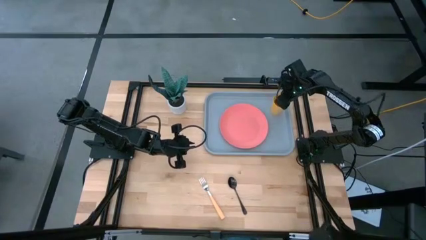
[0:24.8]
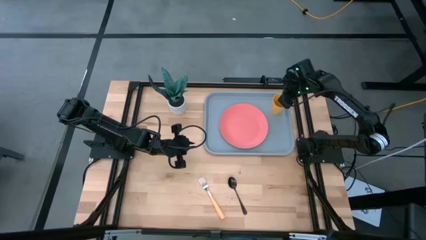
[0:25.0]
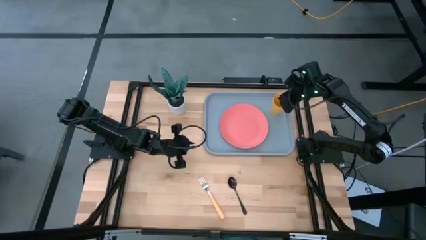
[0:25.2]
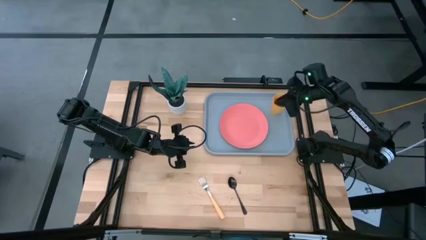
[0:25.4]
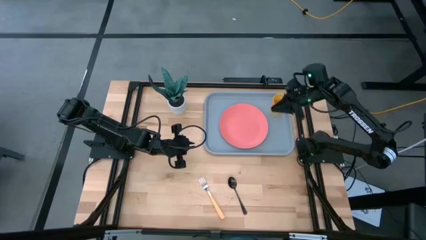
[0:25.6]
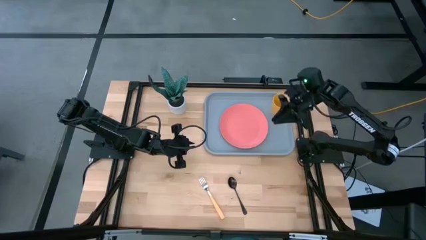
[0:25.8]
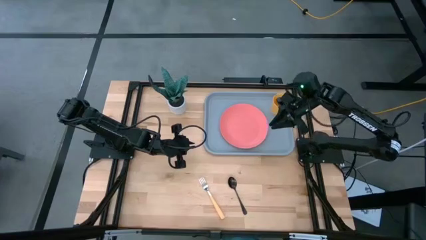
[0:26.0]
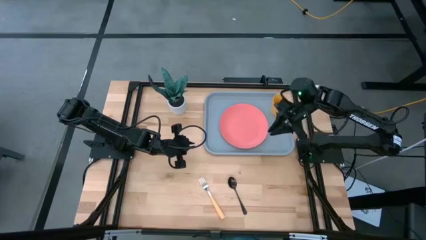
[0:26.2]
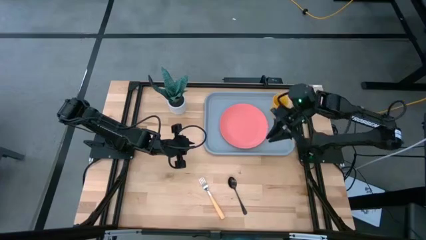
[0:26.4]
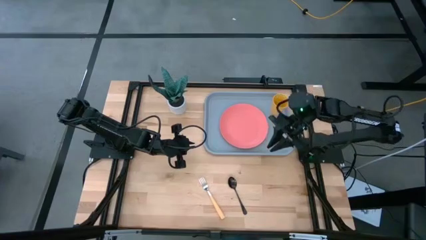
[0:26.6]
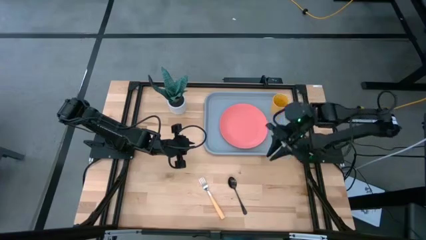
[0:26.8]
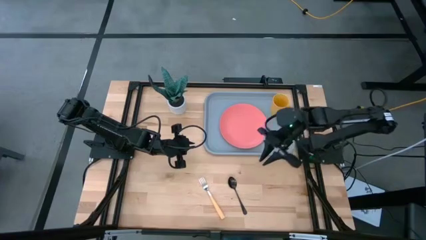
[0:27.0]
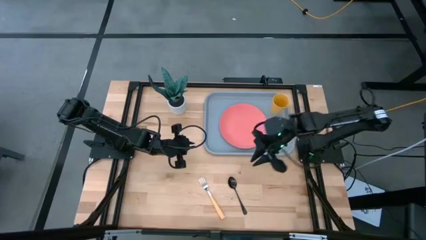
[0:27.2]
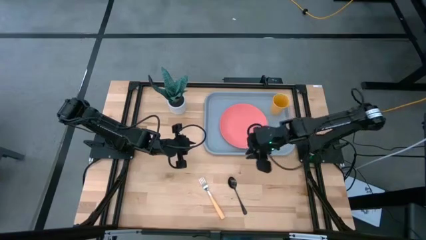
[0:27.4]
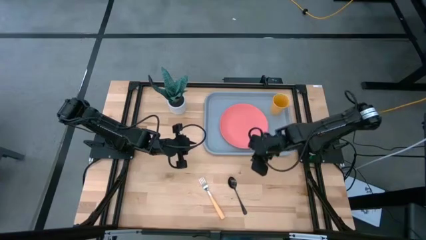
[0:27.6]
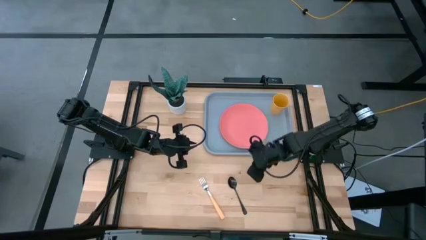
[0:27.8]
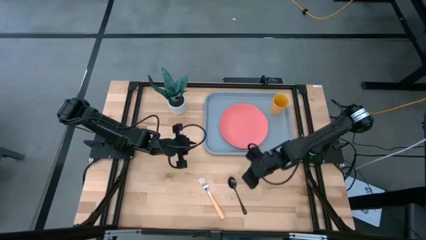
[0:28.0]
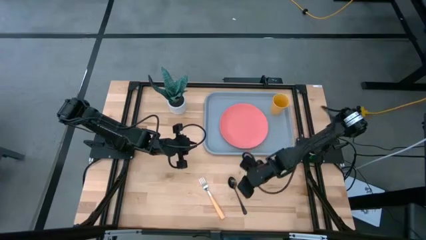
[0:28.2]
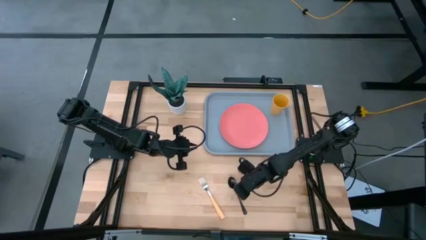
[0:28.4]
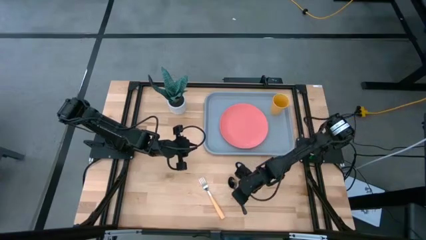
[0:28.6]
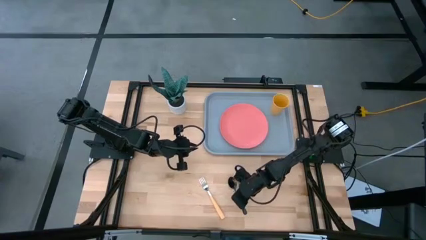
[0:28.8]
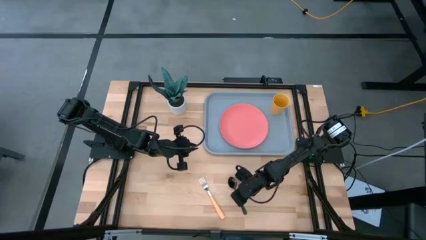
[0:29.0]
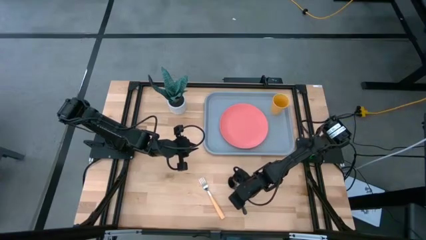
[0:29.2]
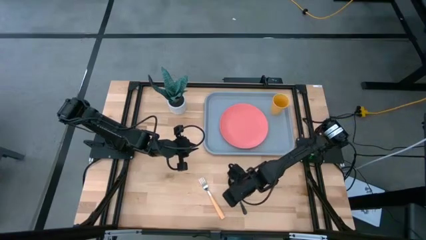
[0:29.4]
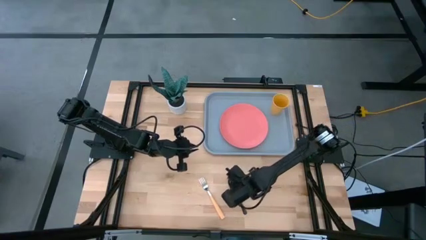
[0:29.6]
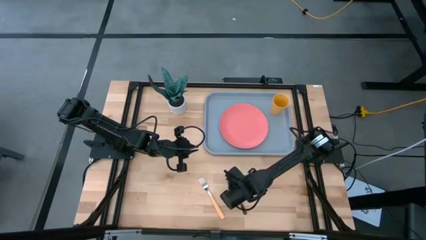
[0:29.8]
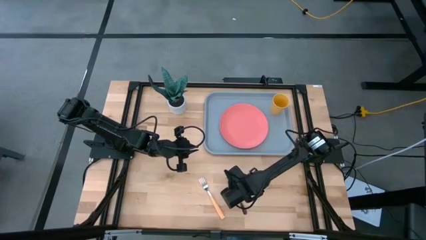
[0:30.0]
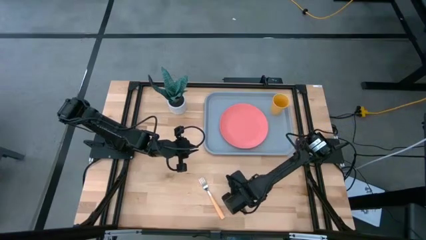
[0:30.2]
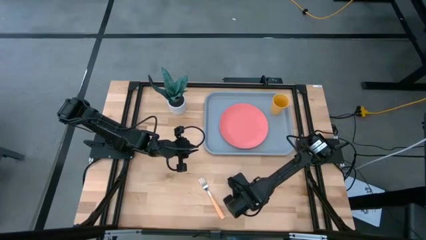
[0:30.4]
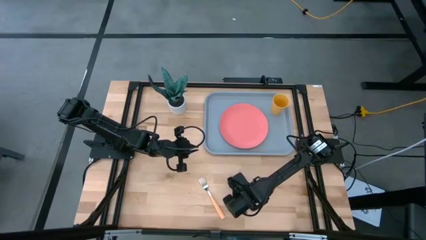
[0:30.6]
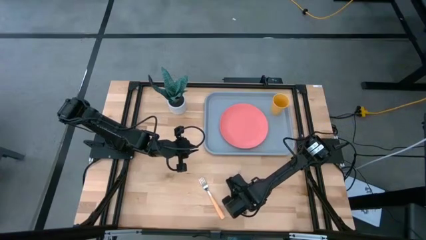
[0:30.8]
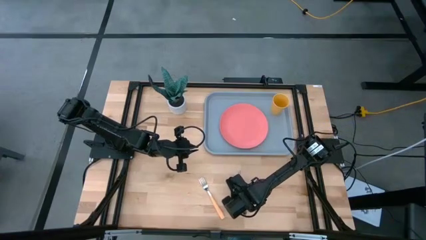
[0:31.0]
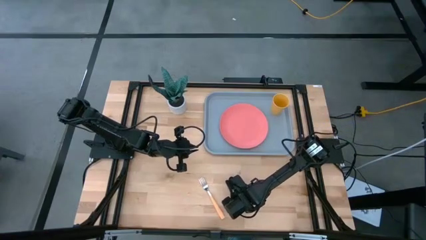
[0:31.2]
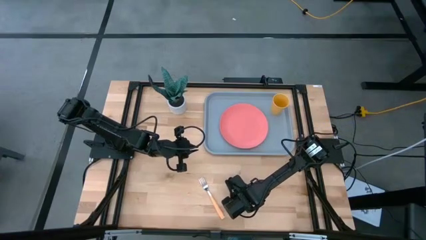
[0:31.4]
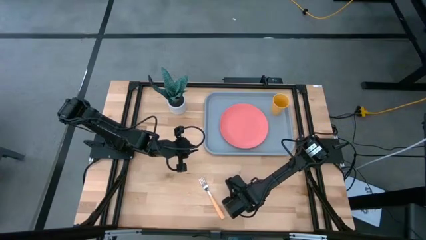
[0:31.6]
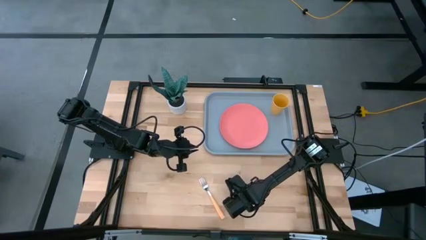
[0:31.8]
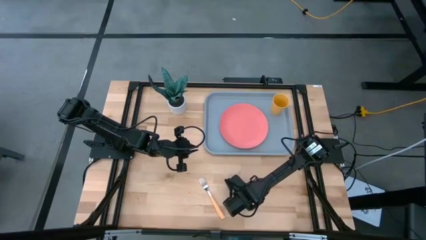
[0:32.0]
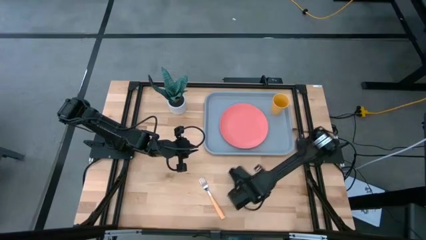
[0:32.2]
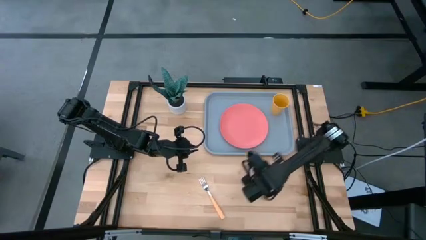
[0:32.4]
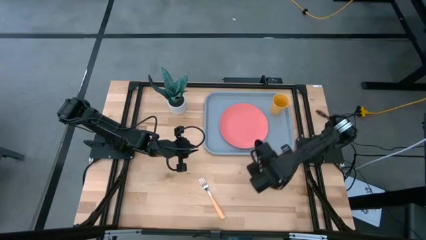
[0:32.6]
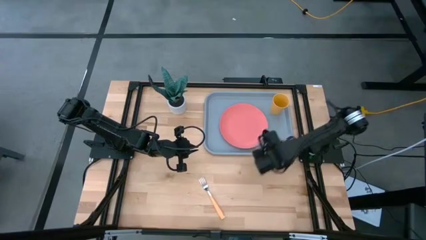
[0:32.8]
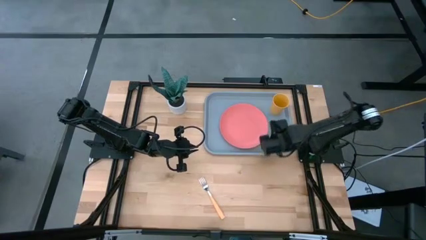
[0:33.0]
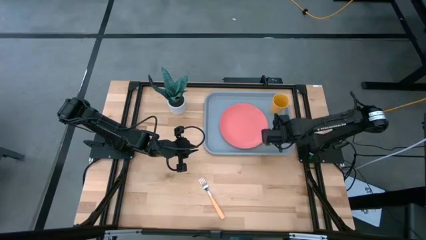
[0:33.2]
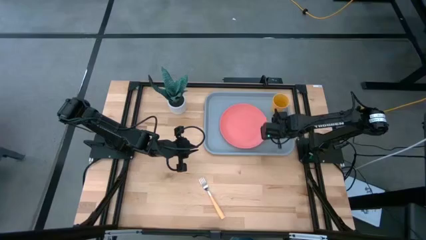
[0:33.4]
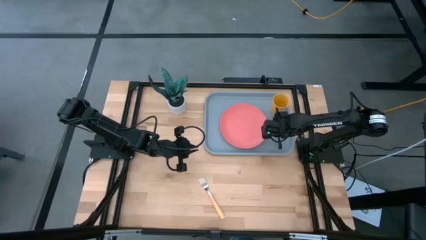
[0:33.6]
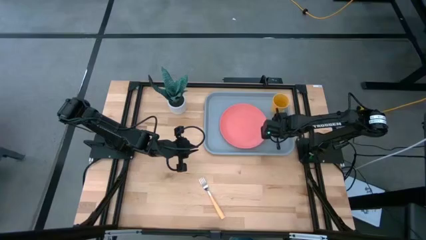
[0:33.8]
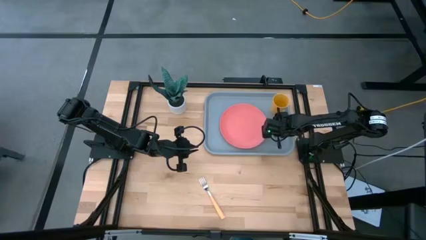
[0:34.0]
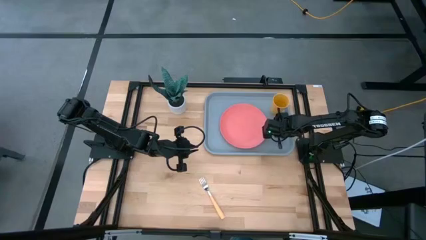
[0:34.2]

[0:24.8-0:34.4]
Task: Pick and place plate/cup/fork/spoon on tray
Put the black spoon to the right of the pink plate on the blue serving tray

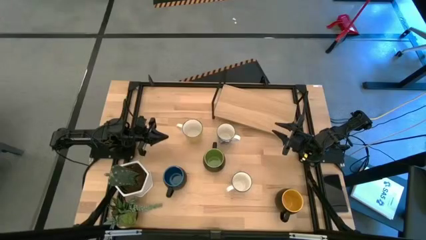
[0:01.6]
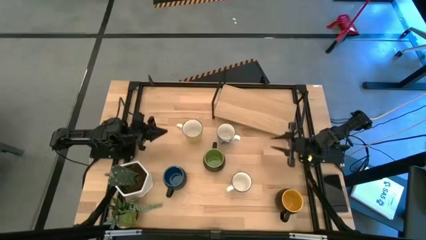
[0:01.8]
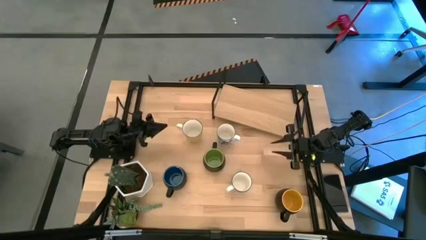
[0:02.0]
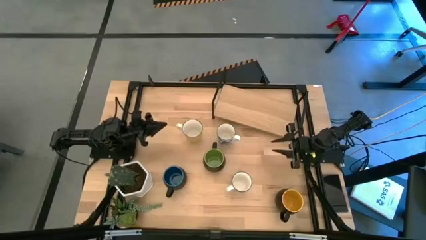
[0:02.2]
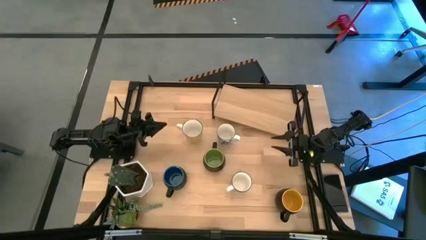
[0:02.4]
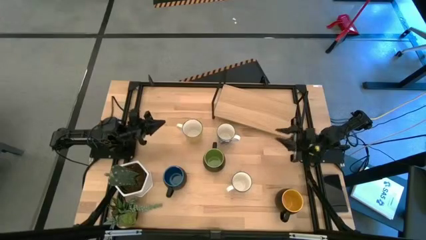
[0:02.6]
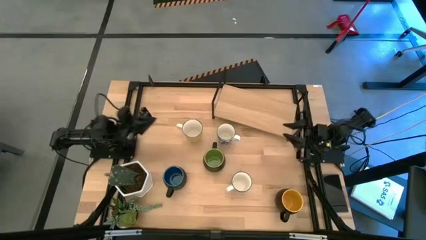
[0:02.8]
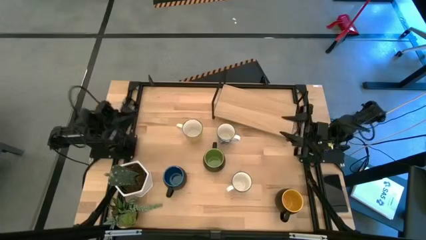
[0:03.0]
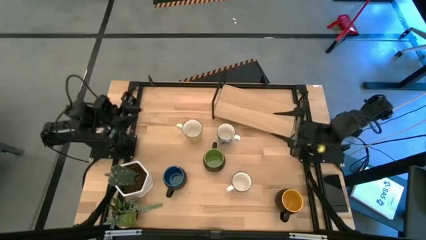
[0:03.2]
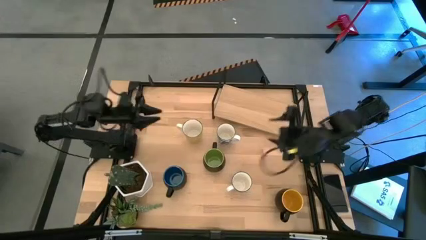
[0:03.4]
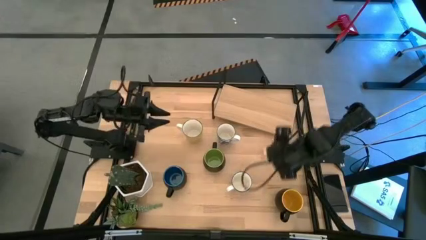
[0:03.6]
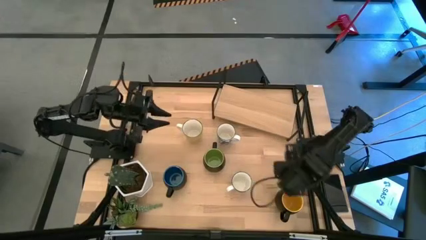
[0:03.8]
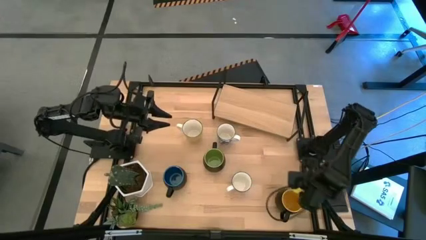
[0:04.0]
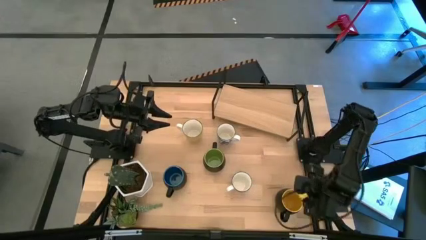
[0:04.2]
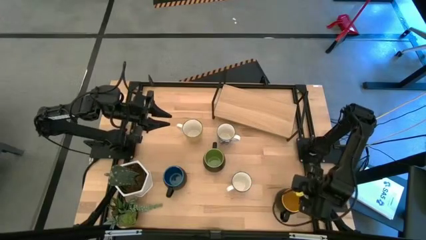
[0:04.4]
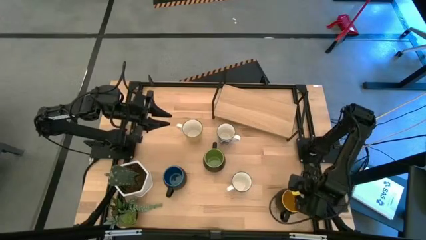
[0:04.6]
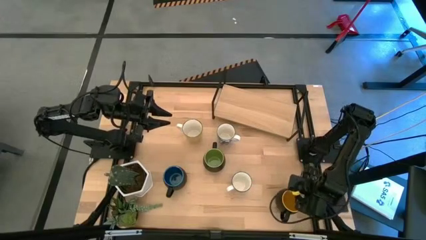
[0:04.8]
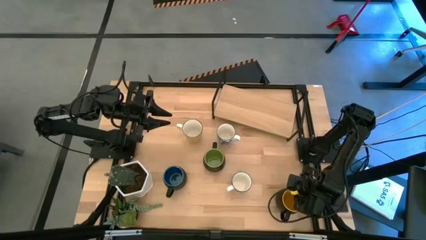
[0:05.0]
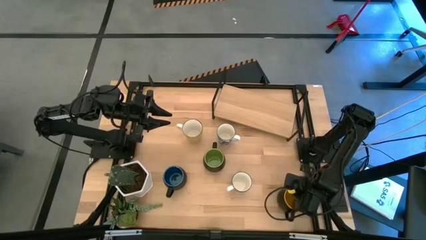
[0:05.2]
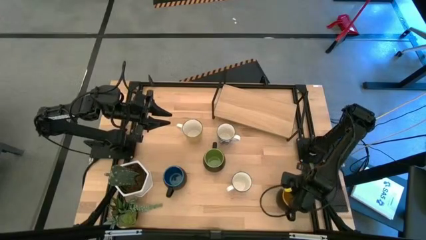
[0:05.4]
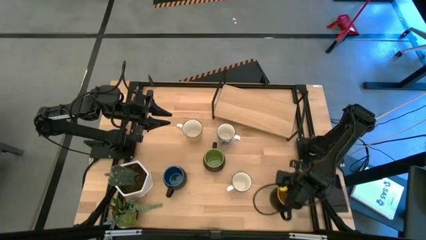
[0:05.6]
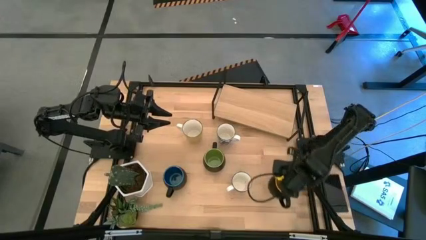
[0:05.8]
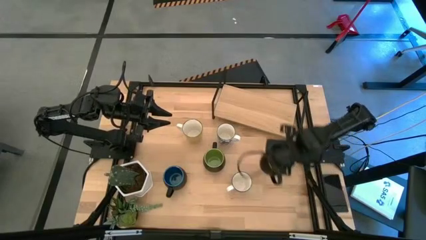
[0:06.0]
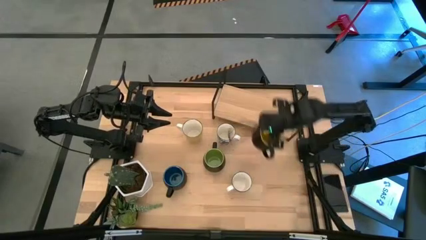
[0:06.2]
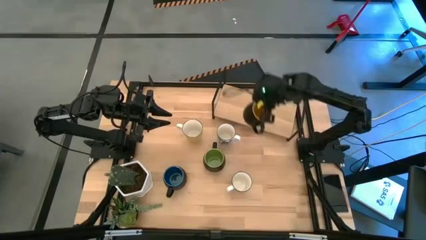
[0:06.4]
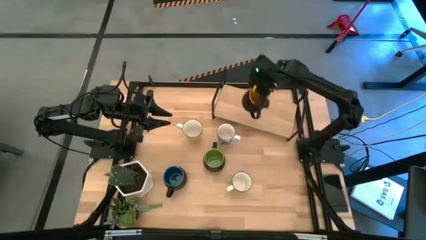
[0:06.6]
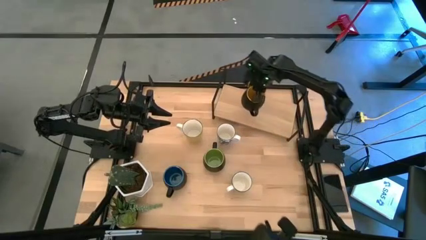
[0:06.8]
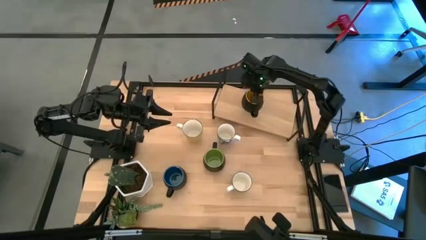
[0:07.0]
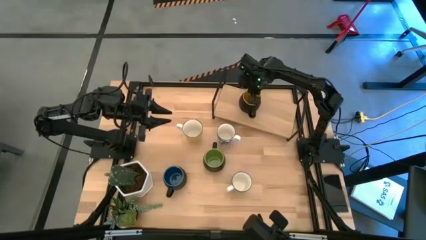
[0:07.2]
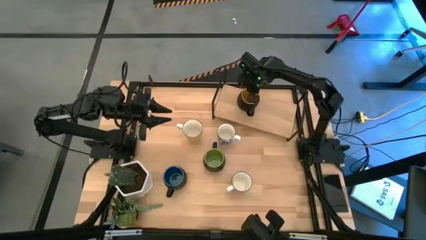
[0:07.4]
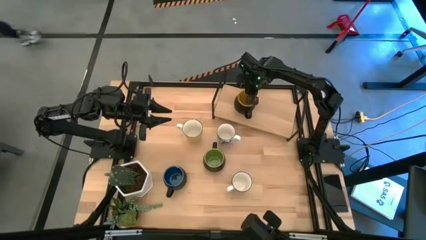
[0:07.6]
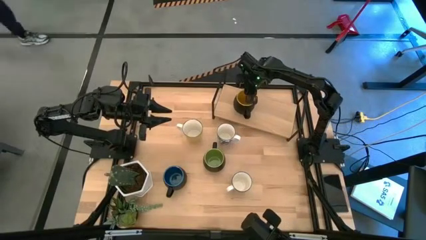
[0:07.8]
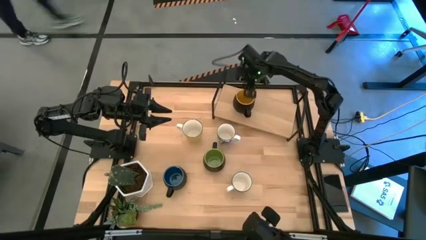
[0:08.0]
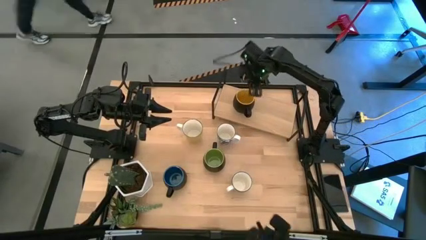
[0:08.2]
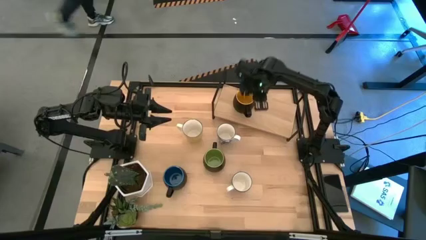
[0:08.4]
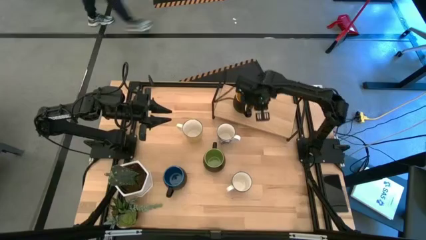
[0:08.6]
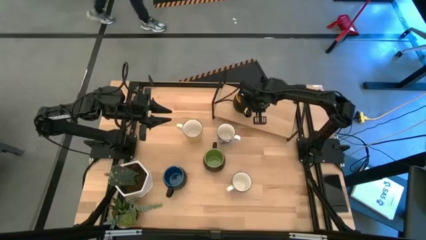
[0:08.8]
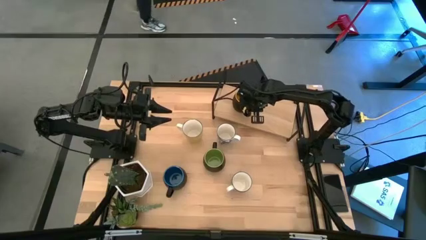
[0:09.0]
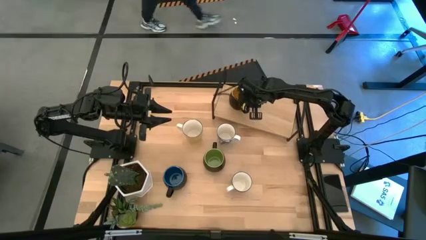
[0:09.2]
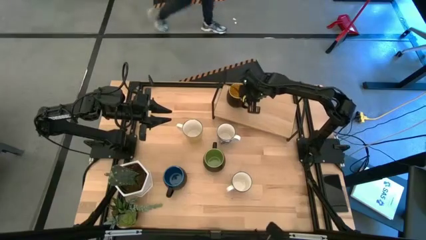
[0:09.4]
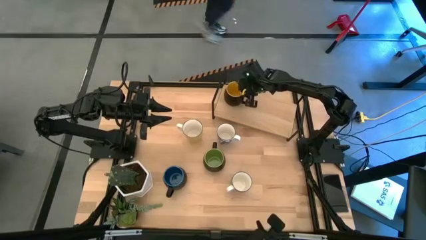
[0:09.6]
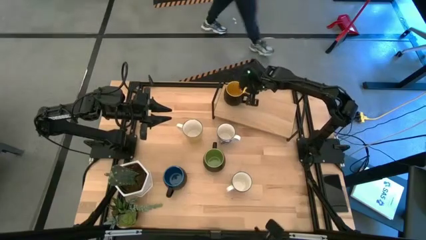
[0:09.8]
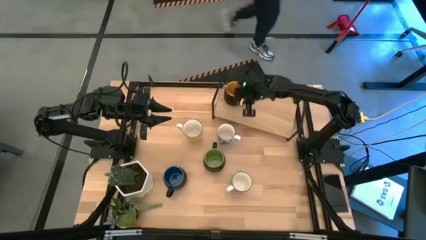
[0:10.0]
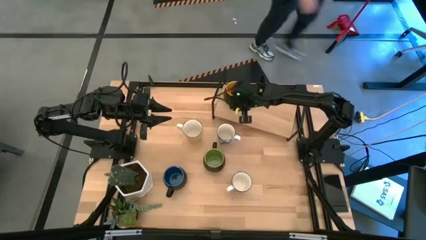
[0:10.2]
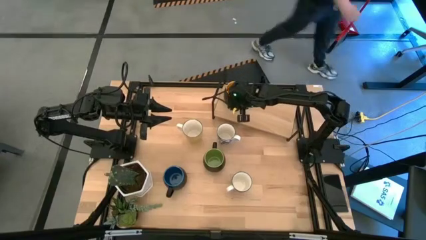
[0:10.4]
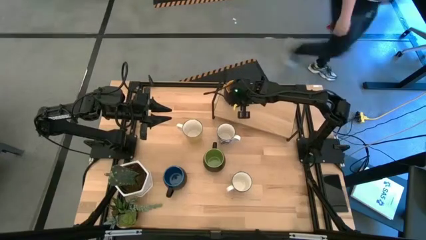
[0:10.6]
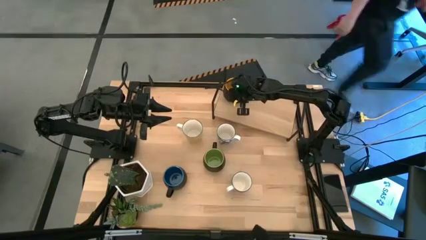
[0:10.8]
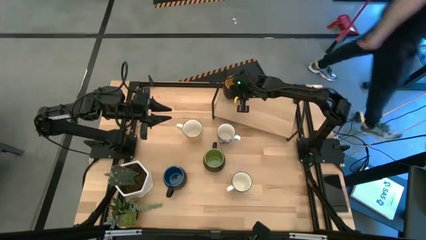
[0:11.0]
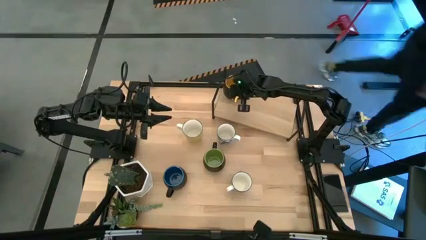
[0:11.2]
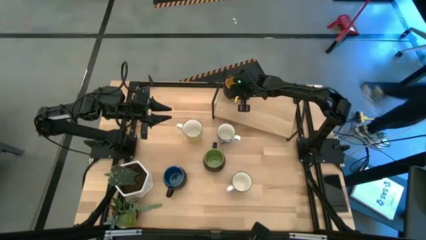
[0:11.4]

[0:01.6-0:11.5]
Task: Place coffee mugs
Put the black-yellow mug on the shelf
